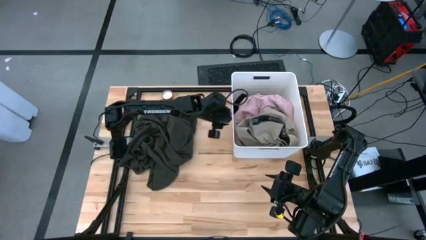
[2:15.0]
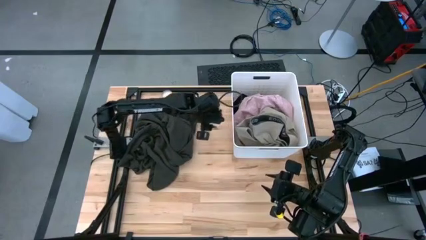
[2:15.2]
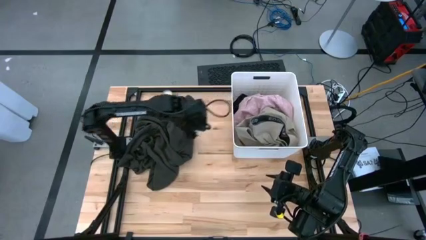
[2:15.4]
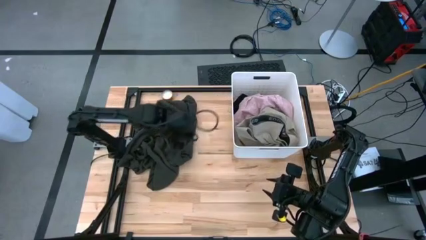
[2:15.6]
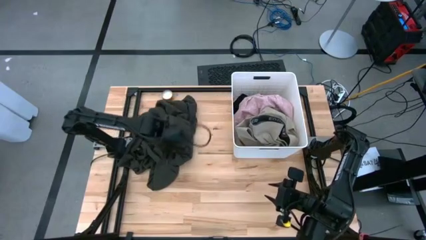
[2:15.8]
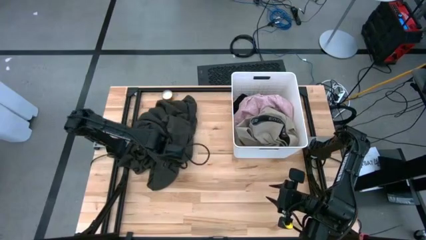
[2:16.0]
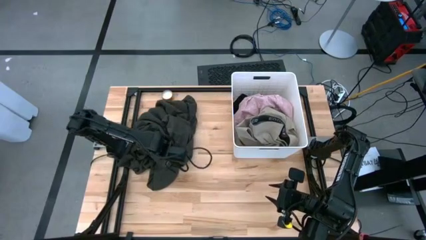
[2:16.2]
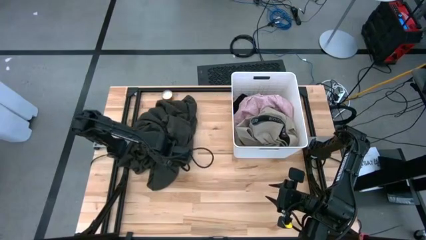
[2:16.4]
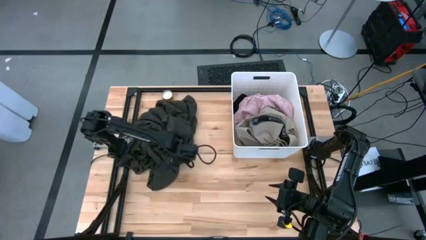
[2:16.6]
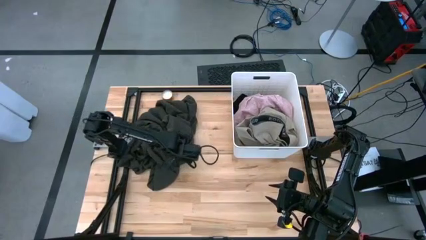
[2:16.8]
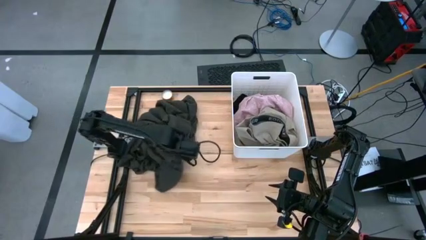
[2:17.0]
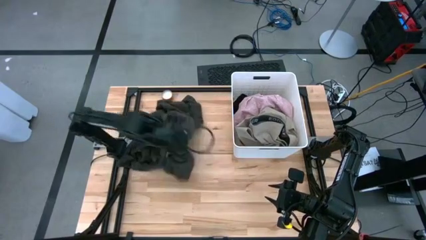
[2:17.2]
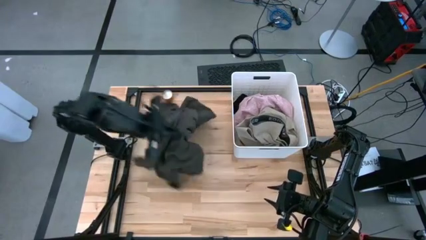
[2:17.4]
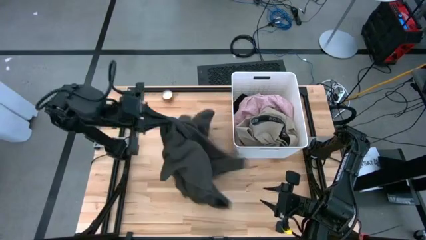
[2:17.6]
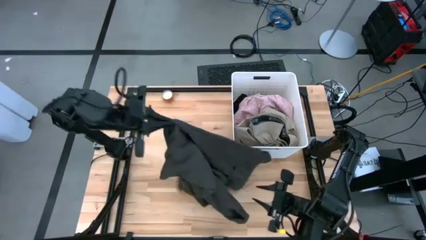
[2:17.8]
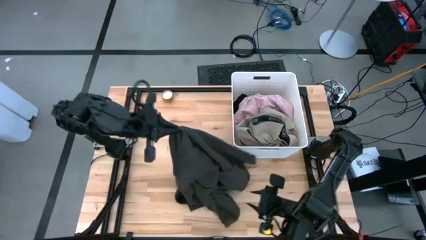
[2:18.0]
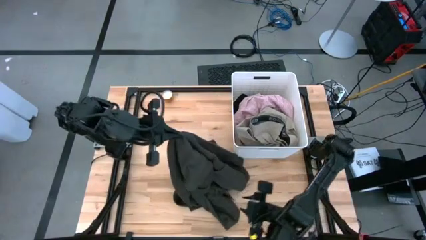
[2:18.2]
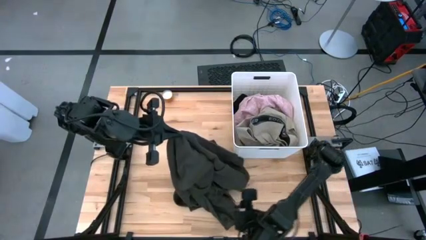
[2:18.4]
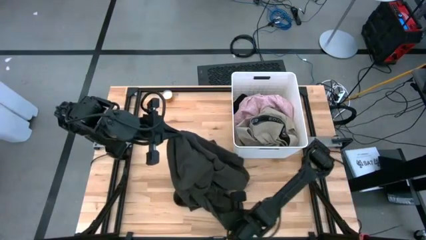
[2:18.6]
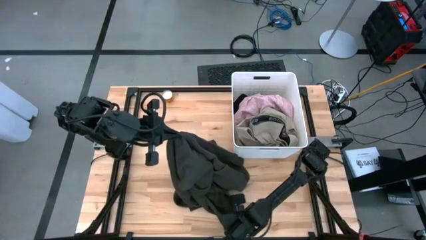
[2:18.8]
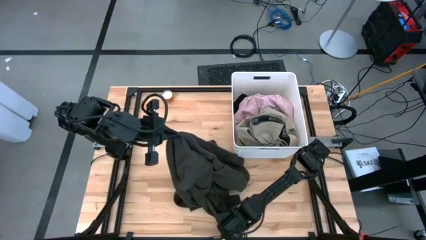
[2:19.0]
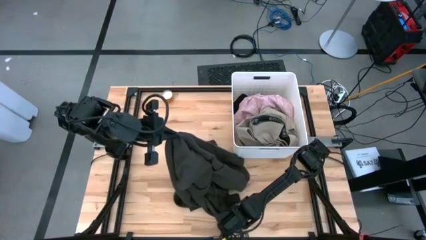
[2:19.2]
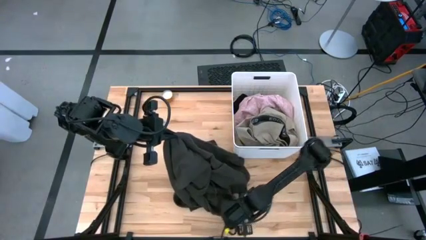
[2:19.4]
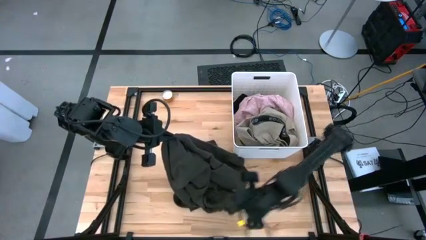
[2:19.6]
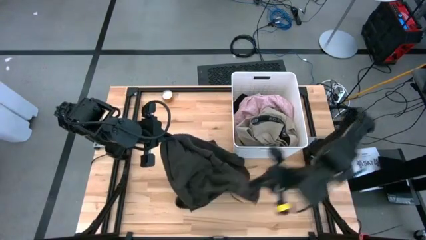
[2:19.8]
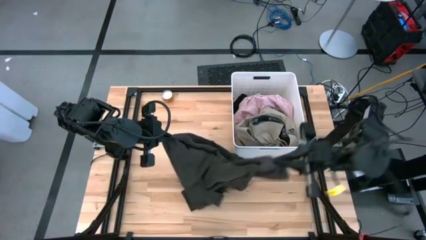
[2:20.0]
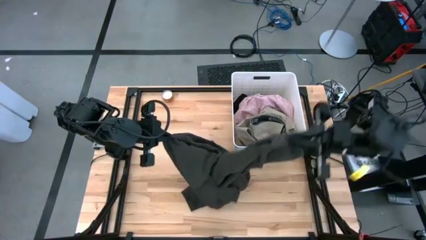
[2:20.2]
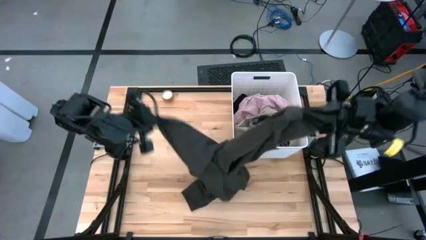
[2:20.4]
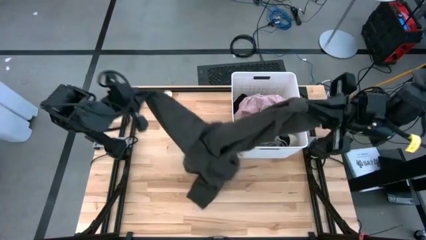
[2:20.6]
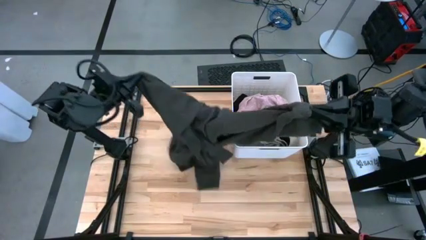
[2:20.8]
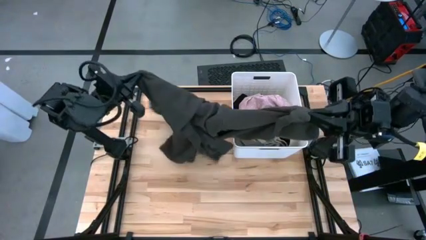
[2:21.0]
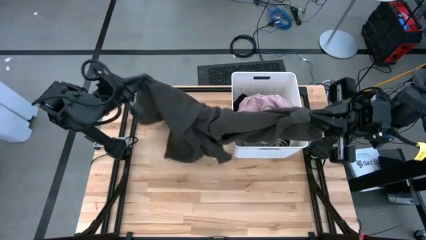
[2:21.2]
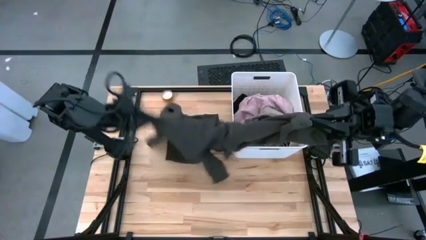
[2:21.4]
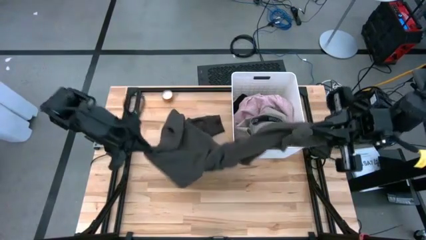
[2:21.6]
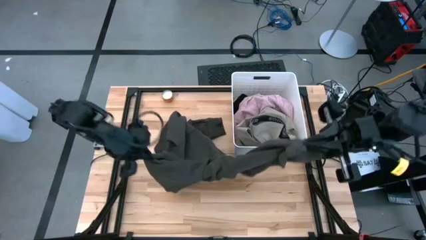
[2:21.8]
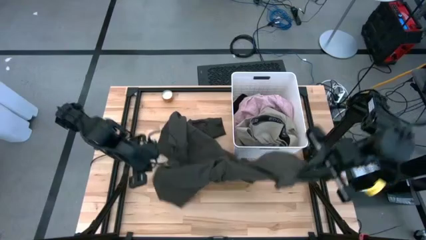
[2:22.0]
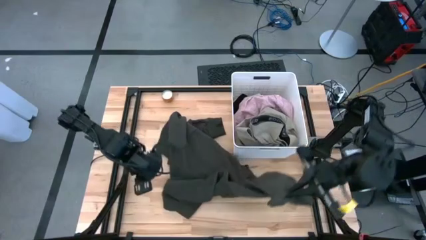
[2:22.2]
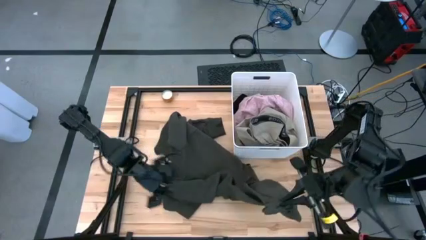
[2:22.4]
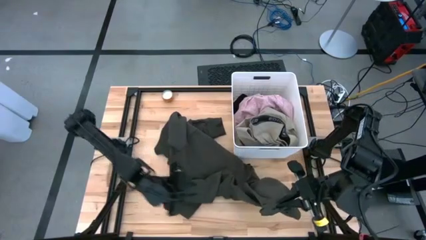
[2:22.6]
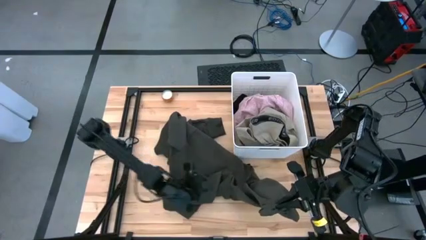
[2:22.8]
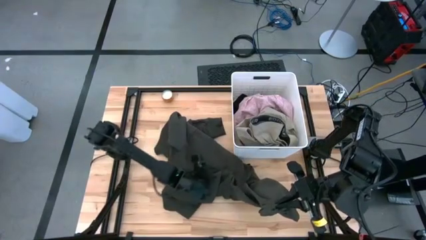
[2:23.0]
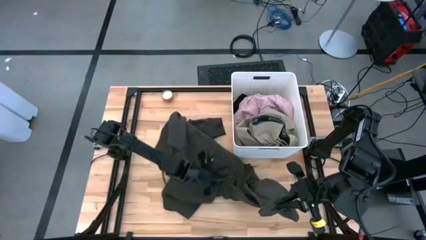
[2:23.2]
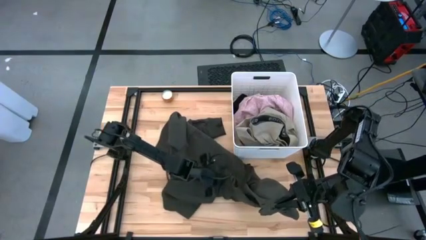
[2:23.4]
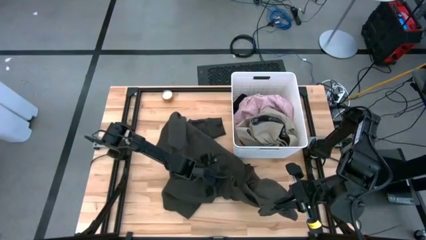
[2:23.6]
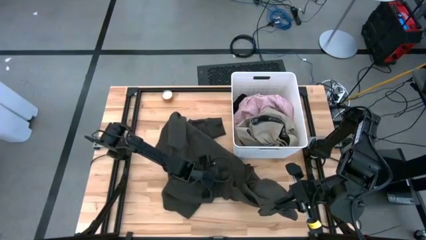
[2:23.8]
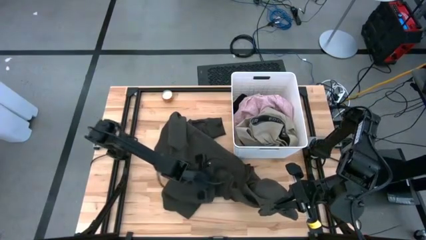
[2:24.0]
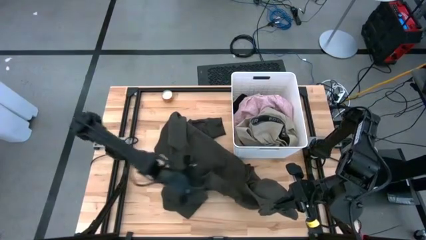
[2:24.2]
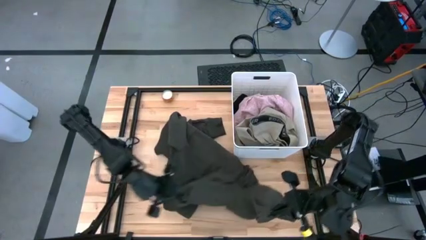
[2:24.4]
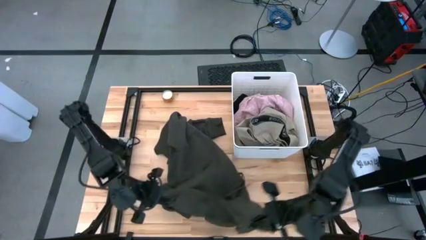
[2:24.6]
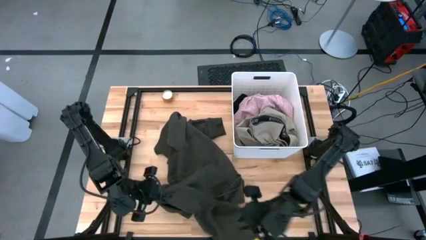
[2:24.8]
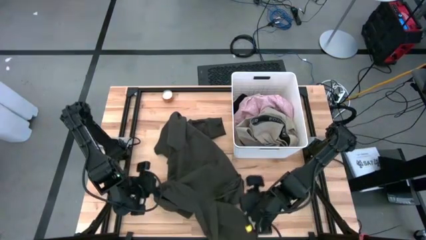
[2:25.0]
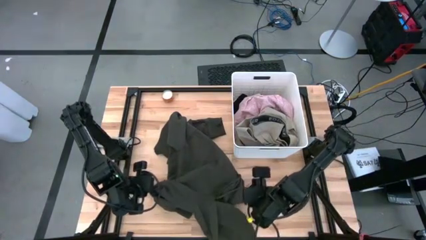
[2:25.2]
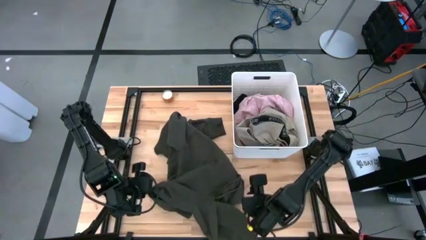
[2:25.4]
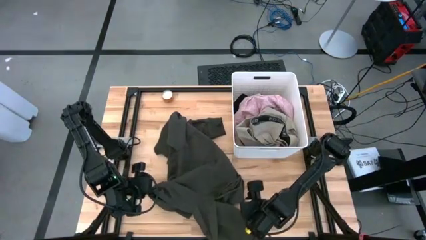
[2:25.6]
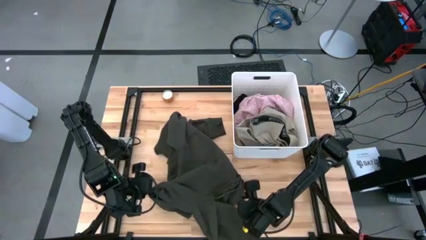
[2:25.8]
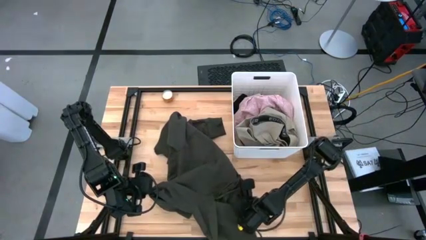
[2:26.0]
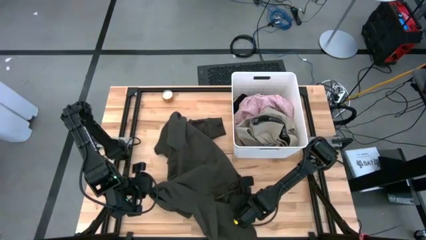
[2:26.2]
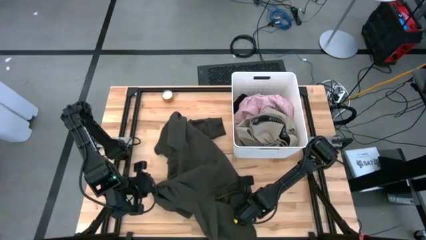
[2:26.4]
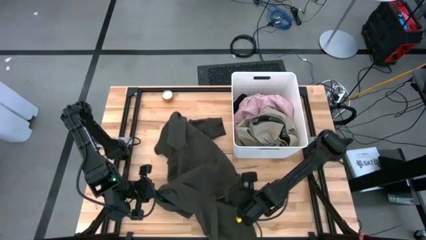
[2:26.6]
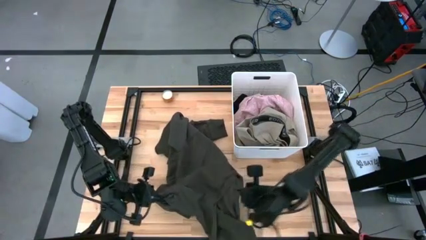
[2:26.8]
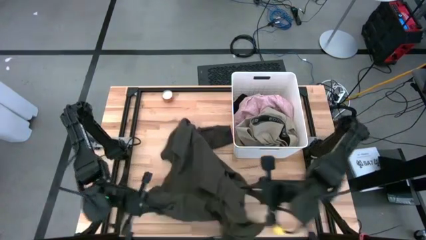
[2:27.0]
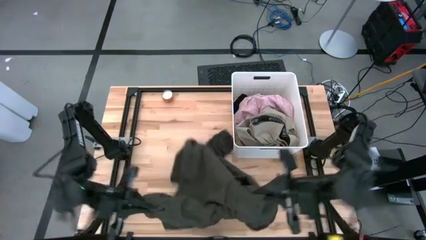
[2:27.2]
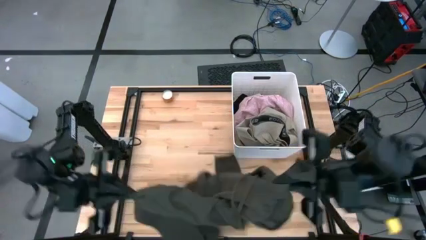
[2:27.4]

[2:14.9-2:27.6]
Task: Sort clothes
Put the black jacket into the laundry bin

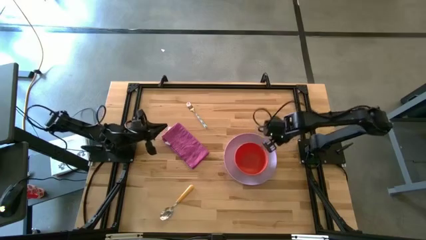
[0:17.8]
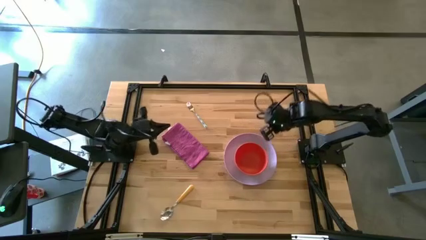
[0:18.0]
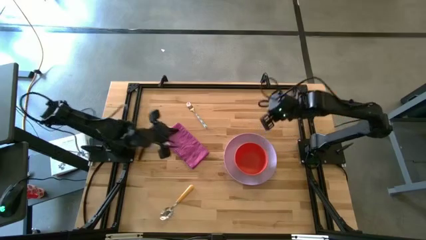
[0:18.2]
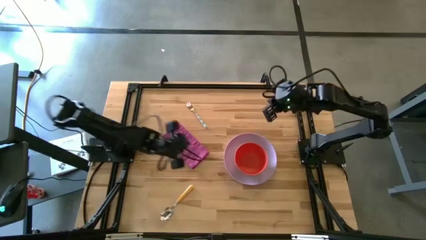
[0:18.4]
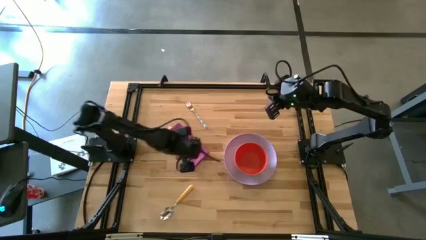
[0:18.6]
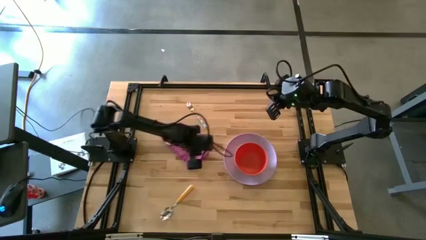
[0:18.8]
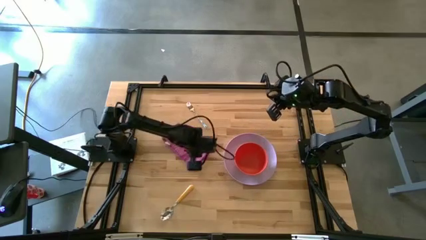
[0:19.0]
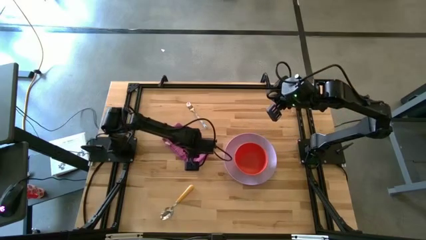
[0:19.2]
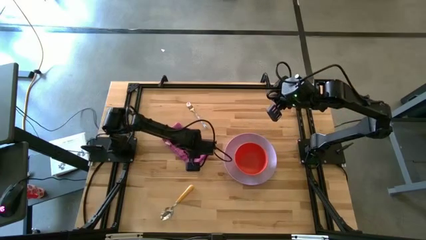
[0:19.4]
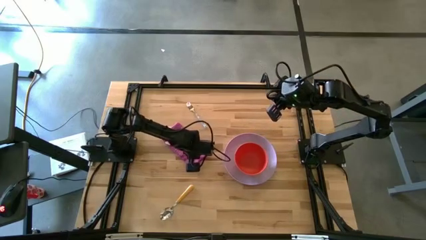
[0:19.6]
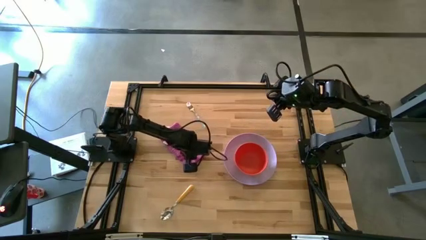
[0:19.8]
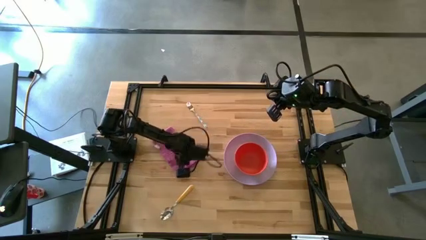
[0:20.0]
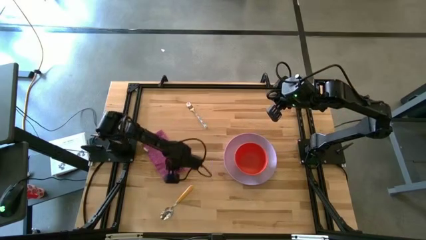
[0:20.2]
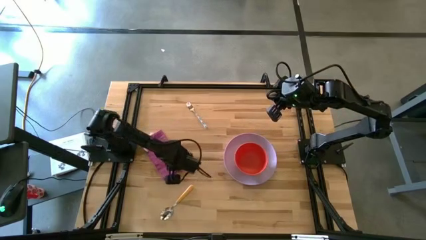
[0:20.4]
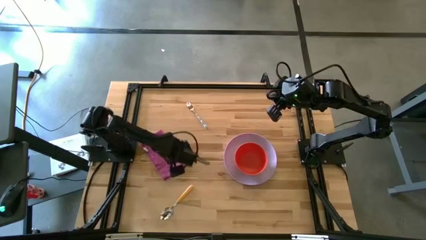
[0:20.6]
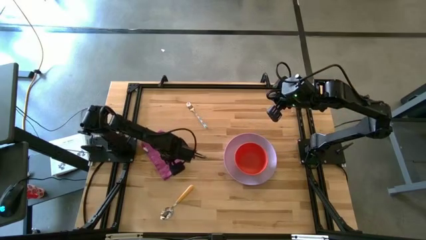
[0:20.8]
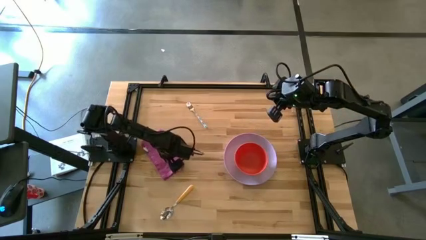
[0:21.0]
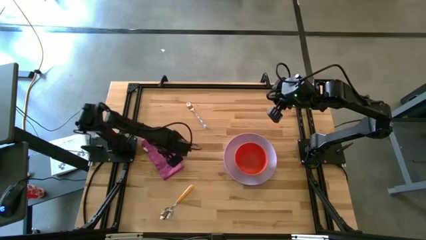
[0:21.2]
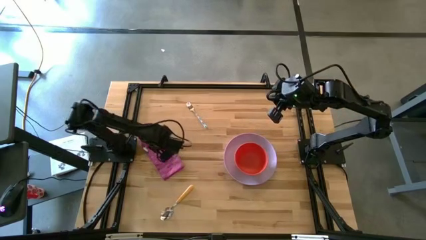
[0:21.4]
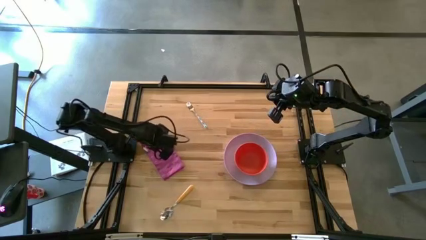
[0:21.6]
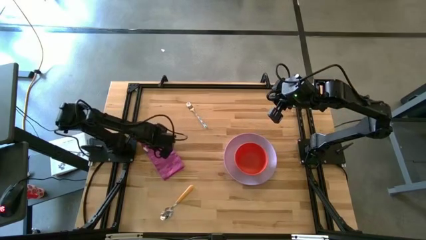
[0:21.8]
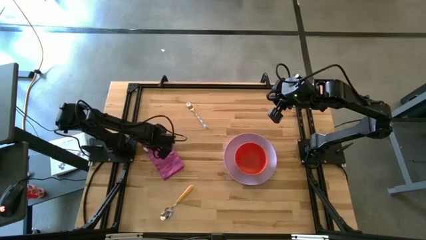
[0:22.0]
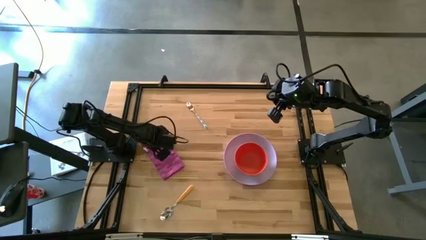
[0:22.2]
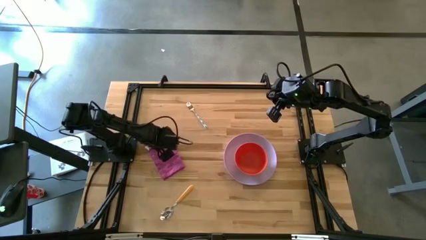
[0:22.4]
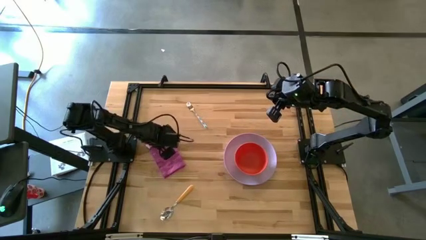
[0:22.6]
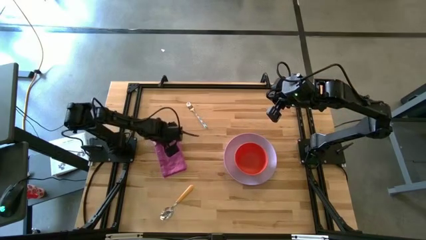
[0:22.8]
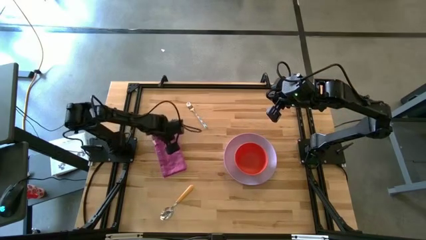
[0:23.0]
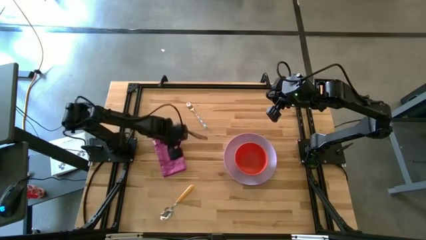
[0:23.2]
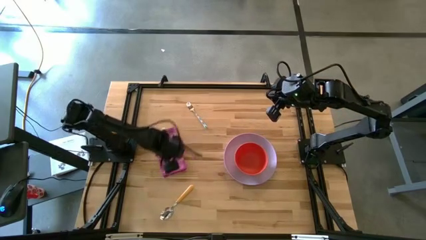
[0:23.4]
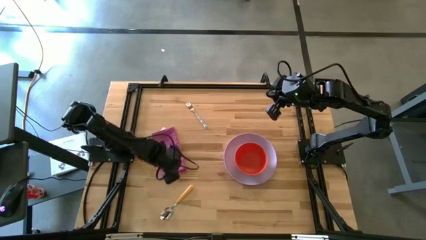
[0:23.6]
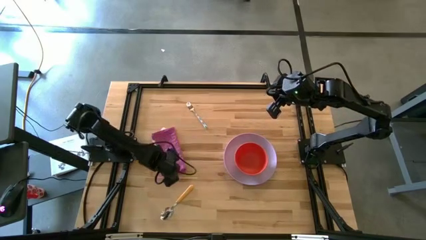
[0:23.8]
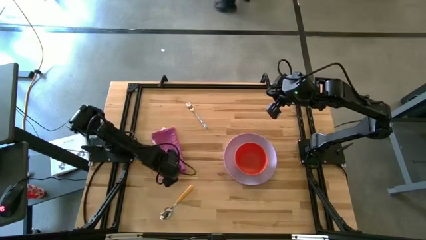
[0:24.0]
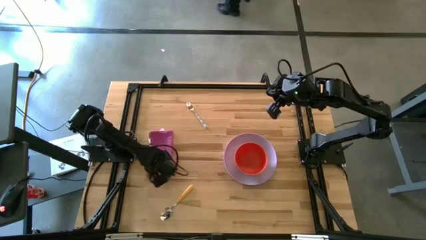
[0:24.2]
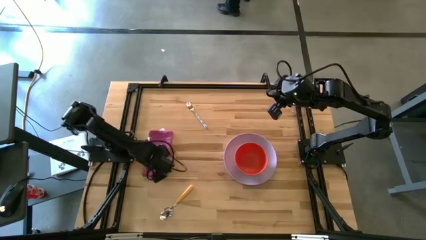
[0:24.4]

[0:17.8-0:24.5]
Task: Set table place
Move the purple table napkin to the middle left of the table
